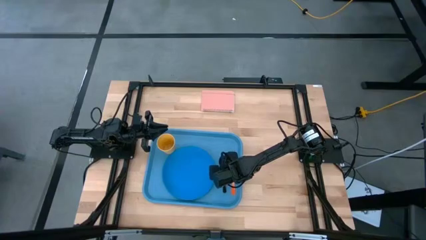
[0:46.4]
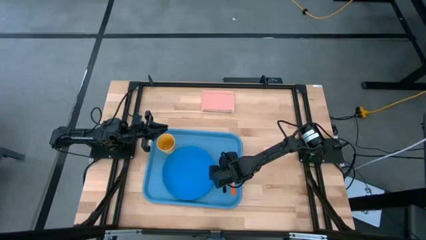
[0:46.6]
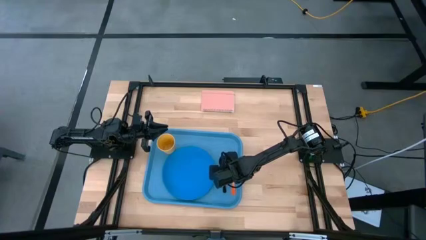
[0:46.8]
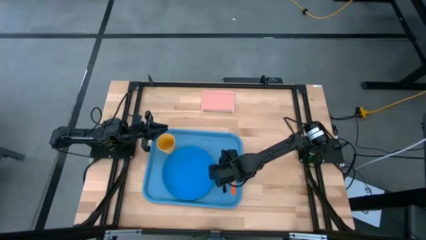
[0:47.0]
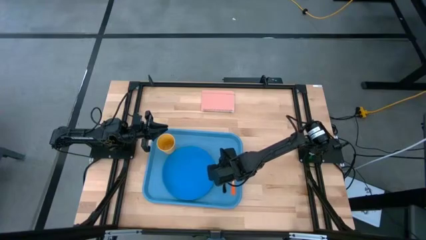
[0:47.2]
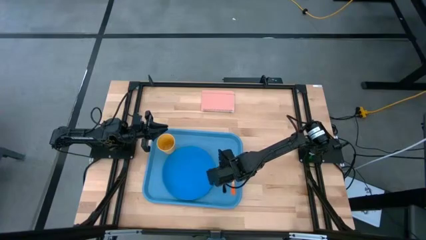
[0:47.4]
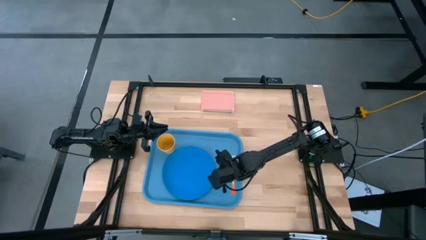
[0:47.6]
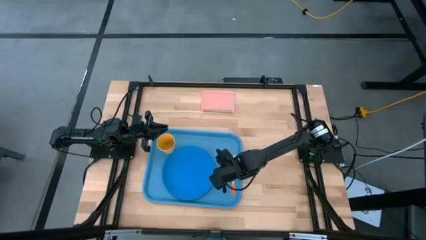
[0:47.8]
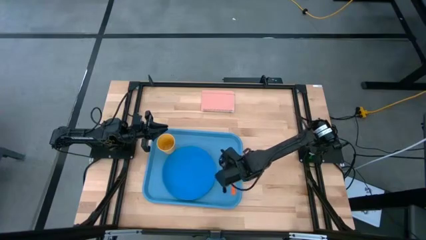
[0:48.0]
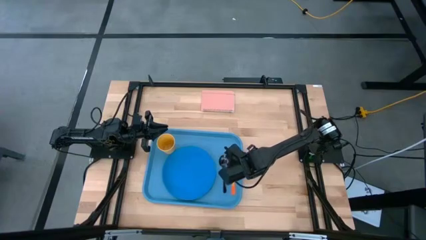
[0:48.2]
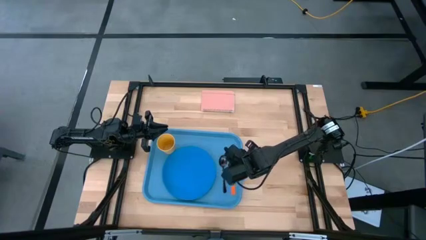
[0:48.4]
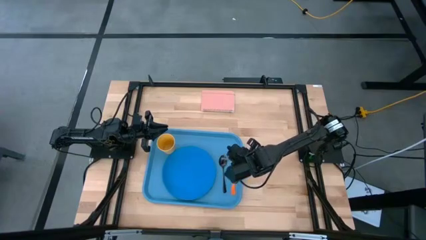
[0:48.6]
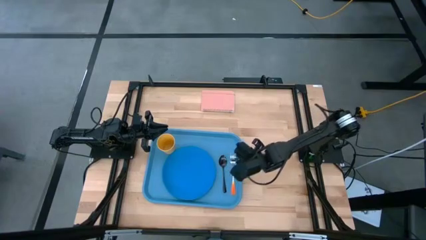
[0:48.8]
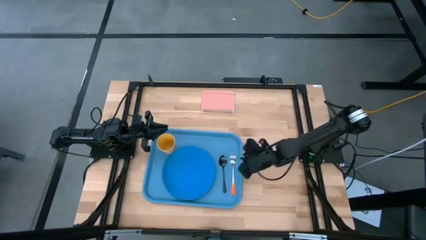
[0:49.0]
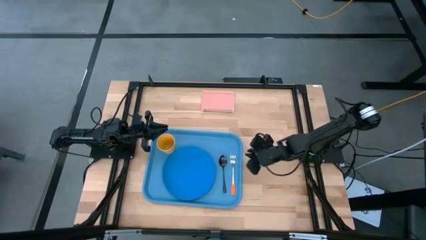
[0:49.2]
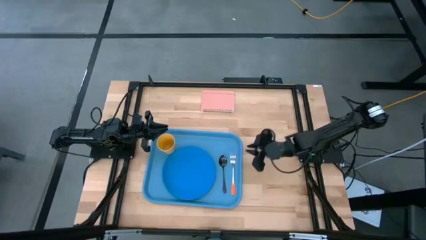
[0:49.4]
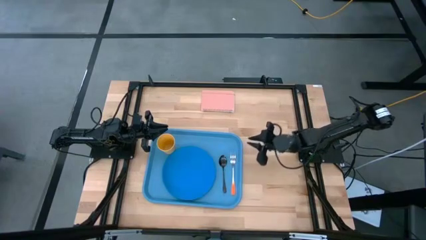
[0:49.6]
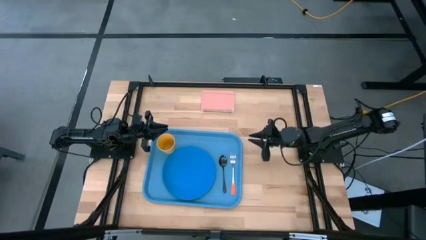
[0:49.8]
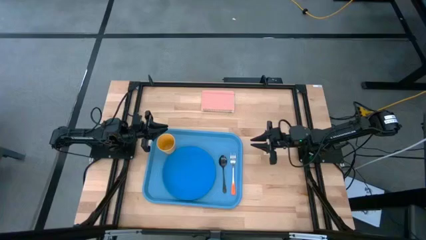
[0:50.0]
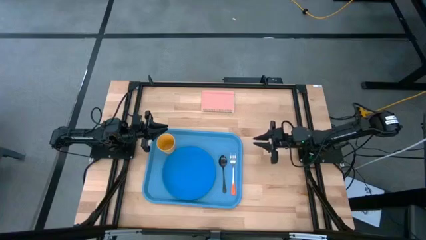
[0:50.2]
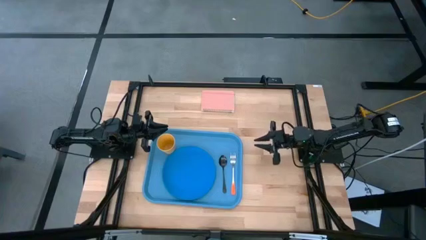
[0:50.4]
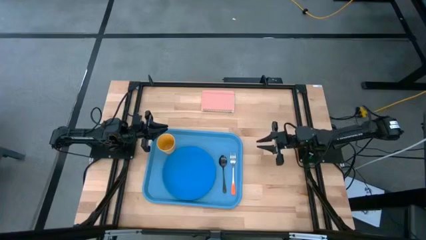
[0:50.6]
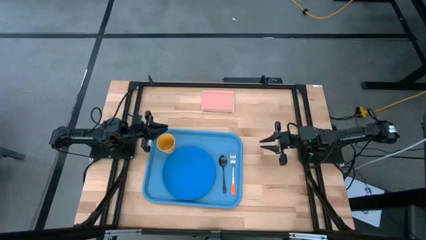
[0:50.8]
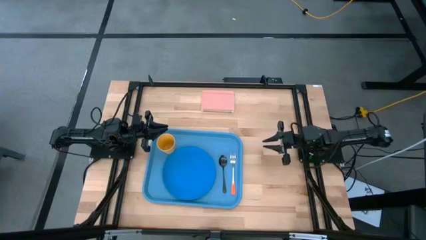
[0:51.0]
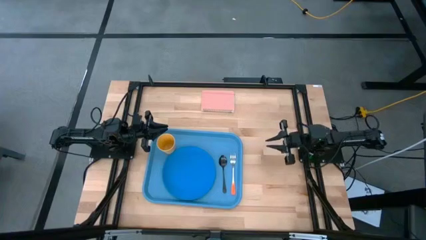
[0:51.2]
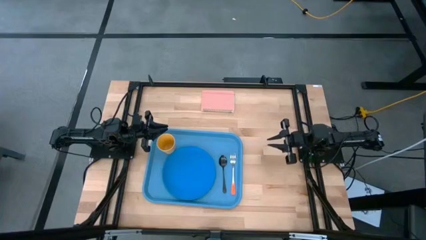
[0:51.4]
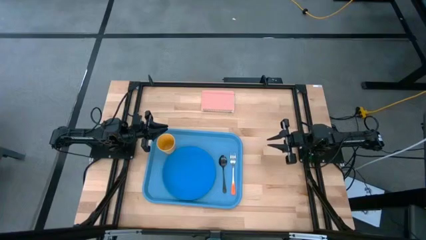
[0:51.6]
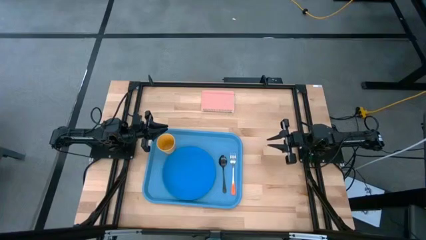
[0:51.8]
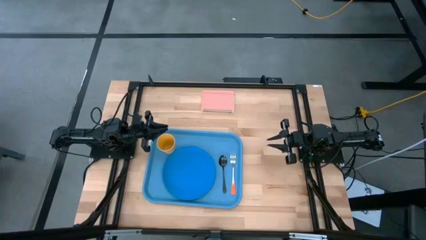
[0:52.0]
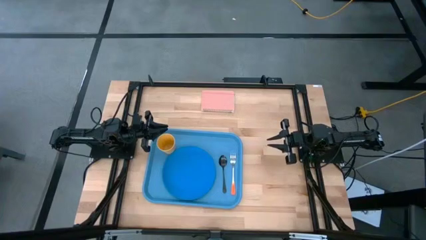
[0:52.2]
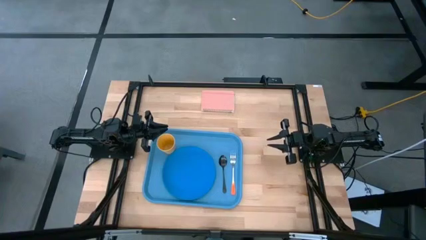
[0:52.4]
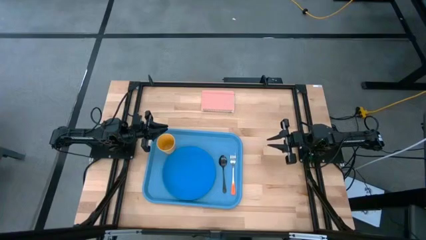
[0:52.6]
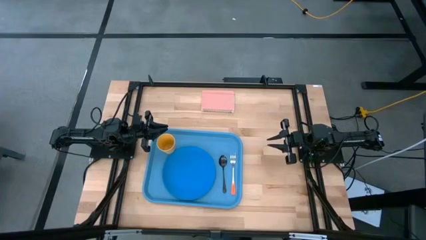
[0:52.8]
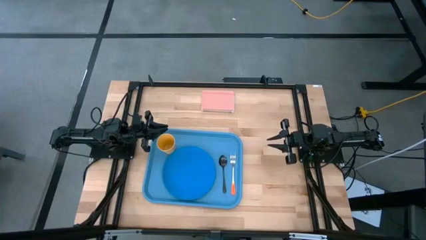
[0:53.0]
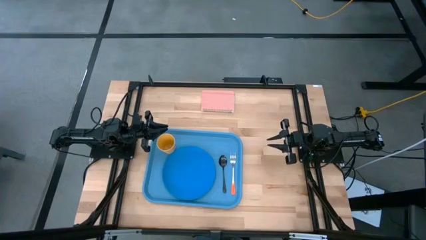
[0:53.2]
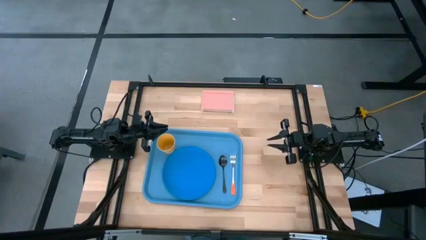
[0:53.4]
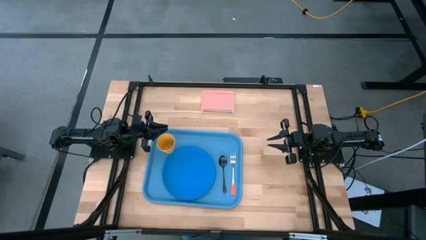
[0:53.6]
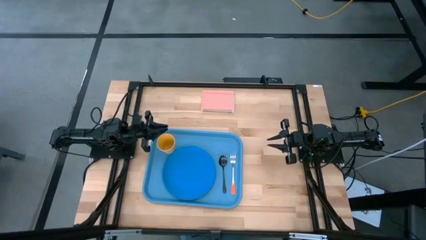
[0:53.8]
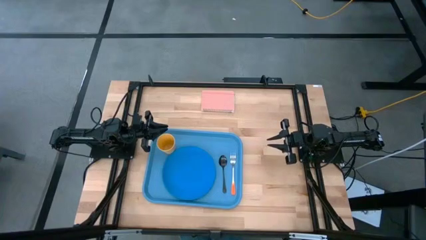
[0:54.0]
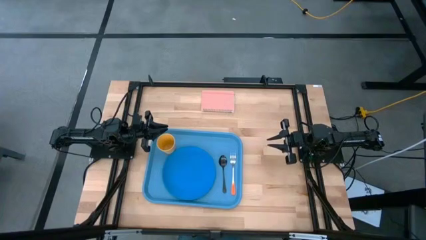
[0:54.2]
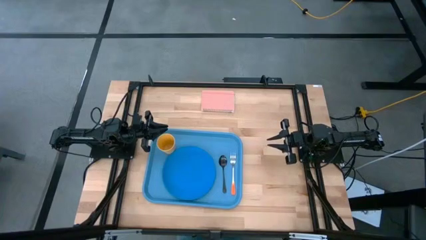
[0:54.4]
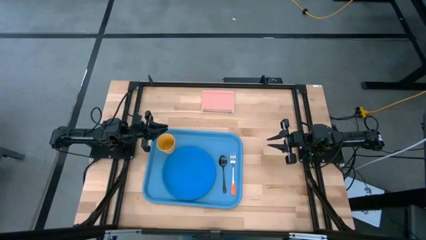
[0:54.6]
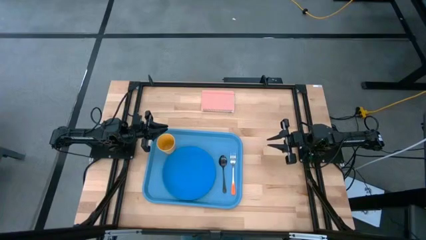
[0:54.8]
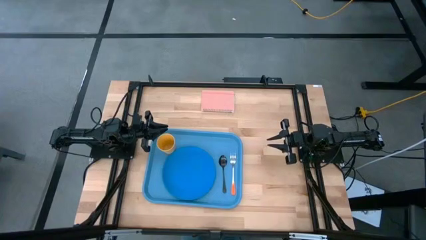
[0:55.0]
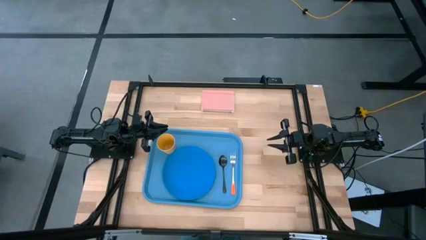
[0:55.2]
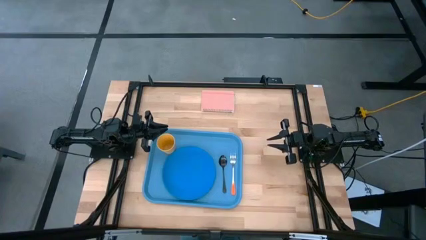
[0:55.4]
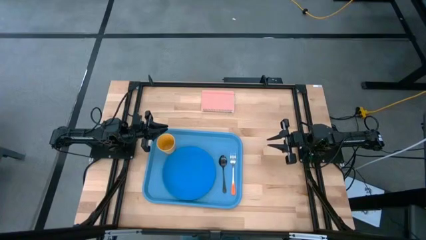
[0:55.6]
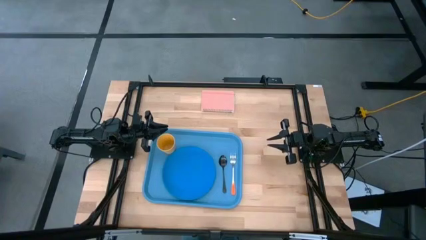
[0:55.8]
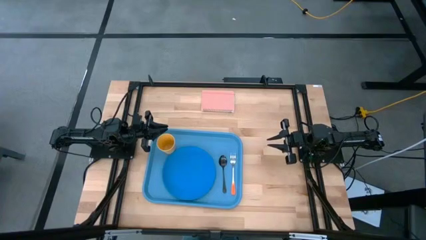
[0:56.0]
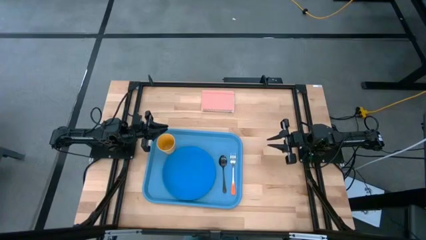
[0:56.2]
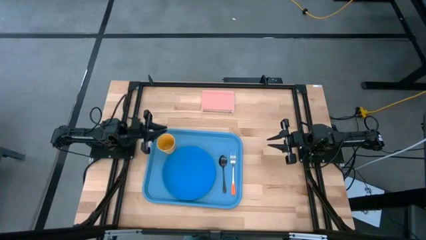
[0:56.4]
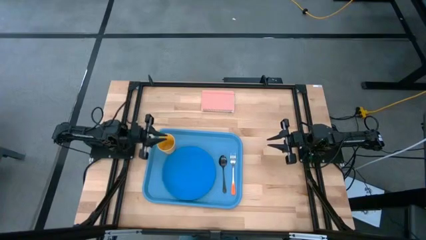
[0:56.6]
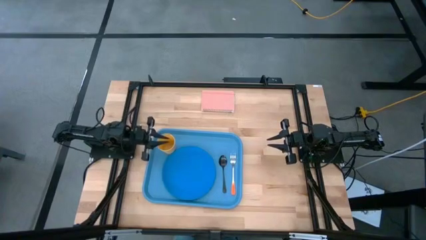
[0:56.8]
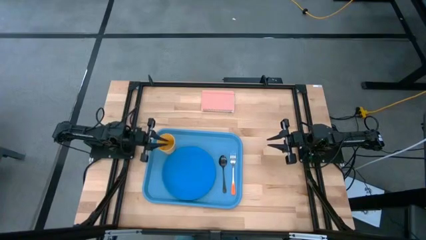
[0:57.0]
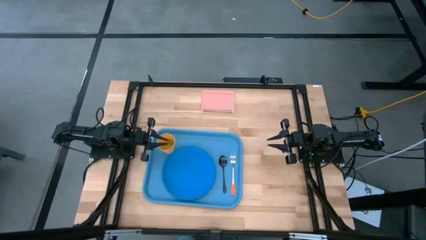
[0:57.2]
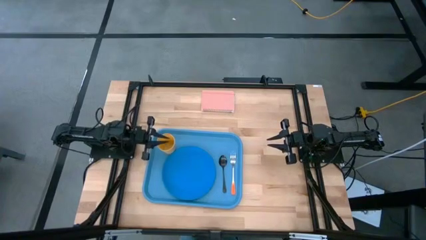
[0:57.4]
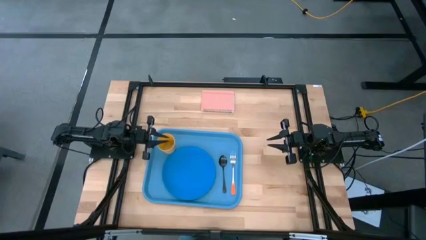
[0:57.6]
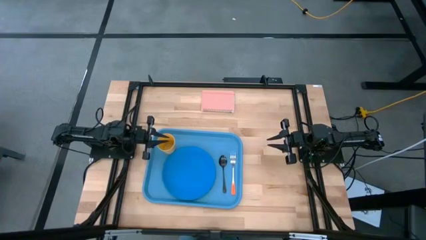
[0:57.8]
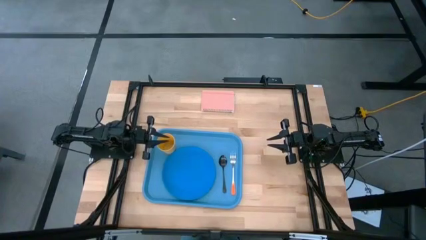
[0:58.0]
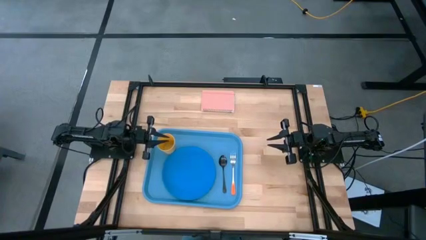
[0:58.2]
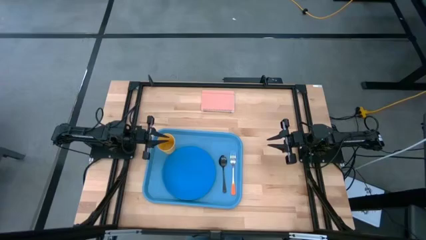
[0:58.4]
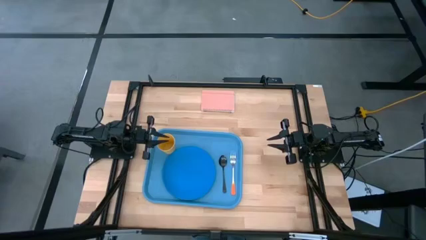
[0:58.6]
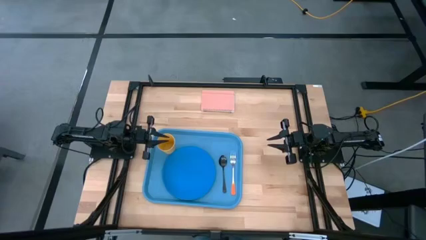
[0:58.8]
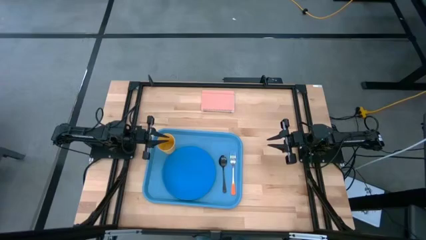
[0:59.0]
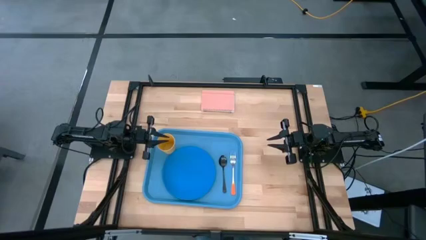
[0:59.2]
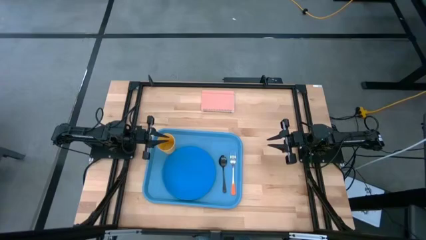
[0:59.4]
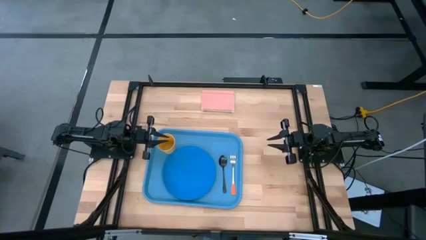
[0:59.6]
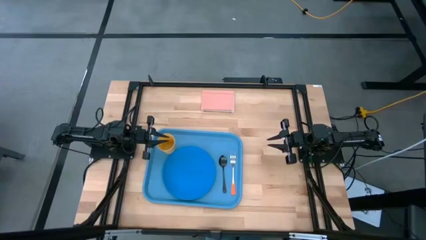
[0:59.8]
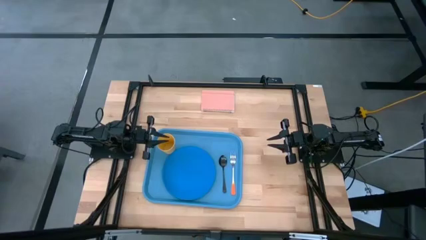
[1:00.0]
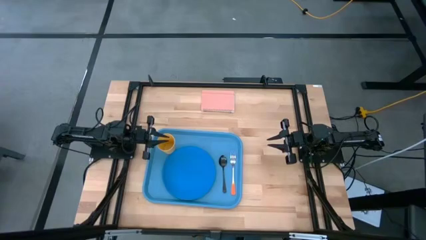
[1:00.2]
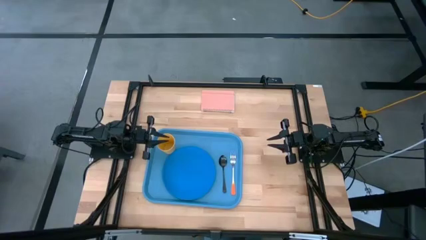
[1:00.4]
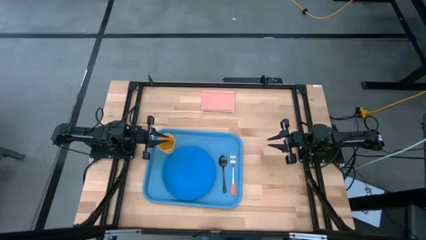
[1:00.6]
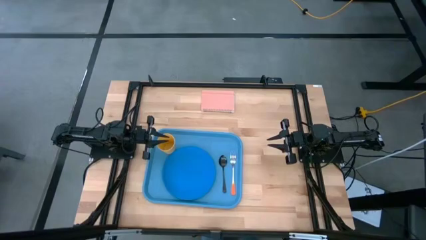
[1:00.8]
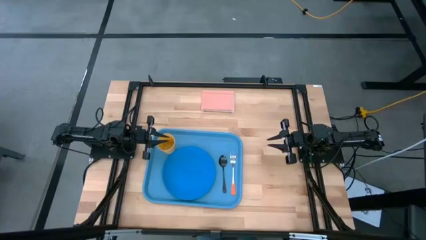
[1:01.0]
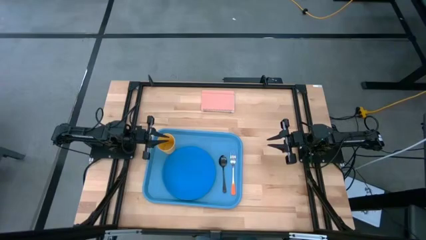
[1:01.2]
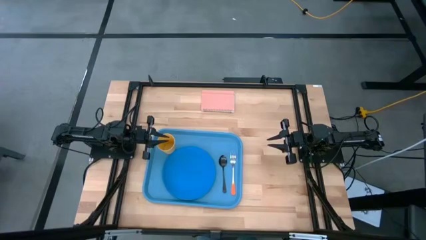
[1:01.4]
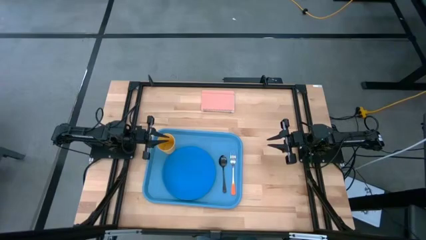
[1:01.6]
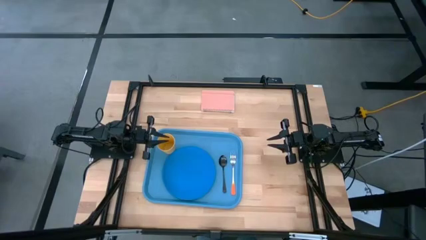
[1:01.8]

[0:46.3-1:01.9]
Task: Pick and place plate/cup/fork/spoon on tray
Return to Home Position

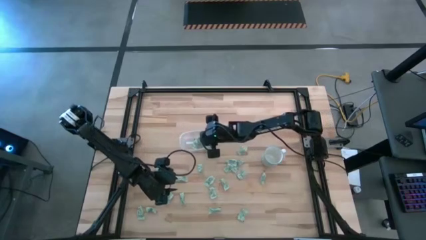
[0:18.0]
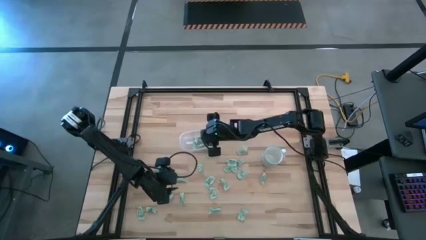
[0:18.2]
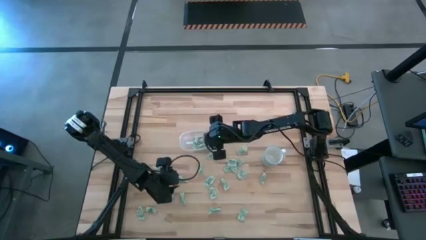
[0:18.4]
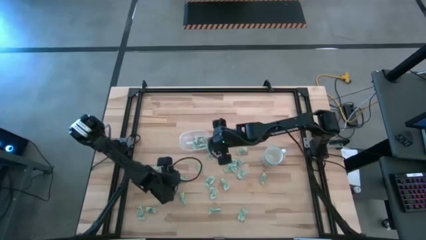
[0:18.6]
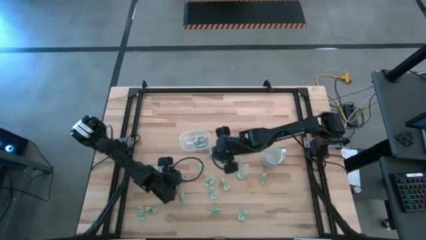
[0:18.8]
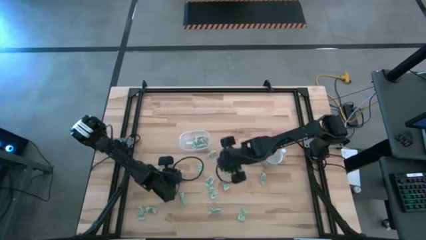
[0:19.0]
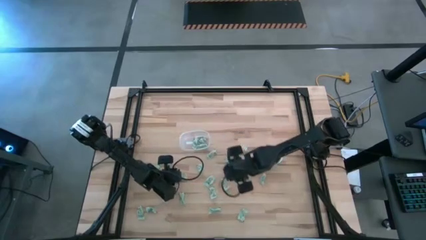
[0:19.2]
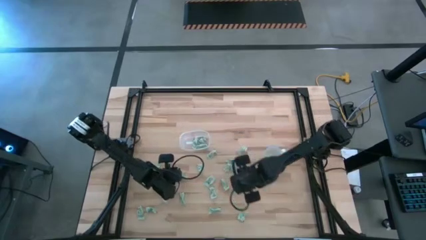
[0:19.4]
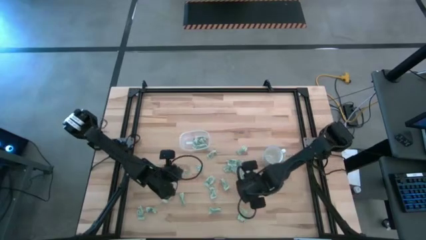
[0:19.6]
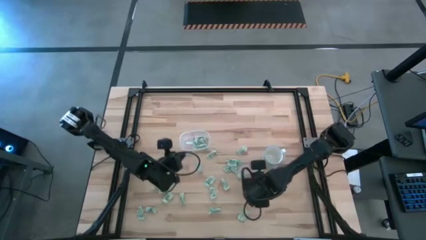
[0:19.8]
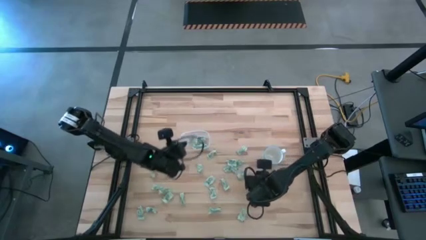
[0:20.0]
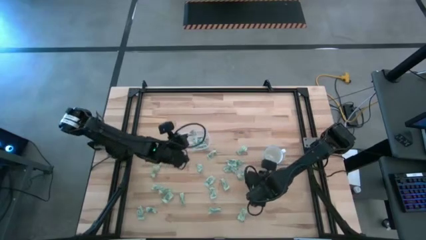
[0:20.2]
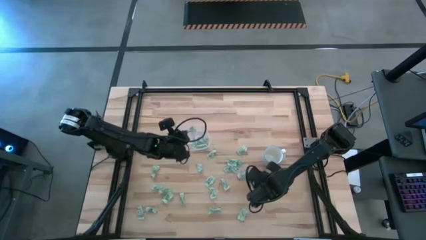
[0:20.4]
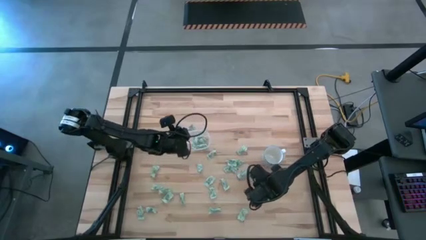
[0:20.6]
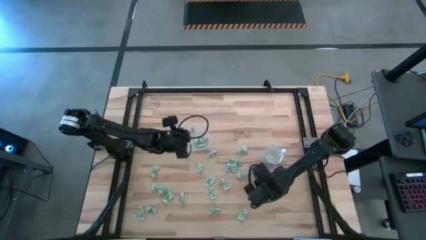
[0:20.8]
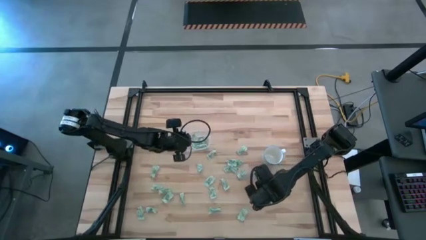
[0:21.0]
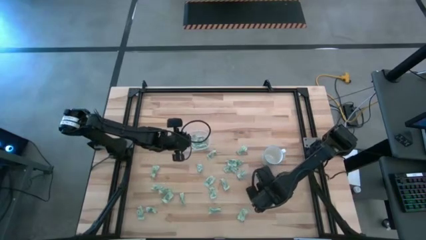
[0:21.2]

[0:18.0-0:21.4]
Task: Pick and place Stevia / Truvia into bins
Put the stevia packet into the transparent bin
